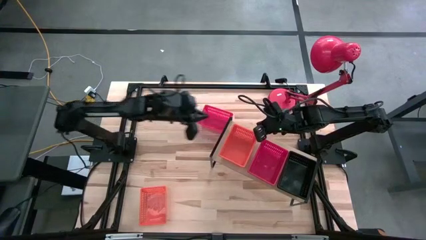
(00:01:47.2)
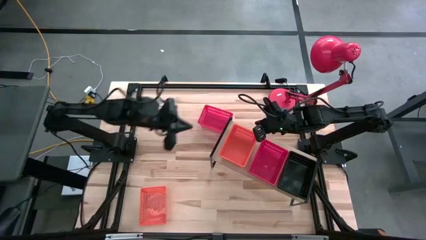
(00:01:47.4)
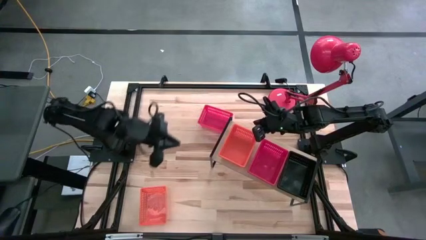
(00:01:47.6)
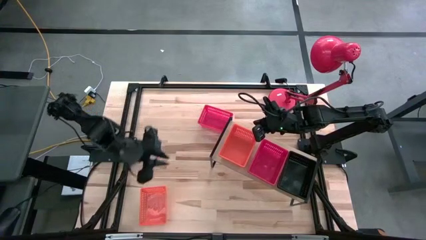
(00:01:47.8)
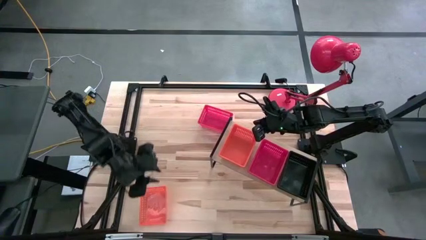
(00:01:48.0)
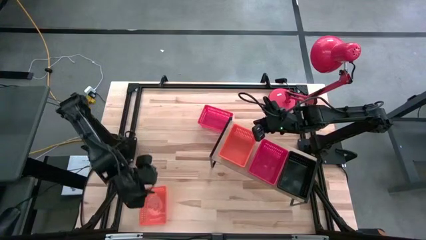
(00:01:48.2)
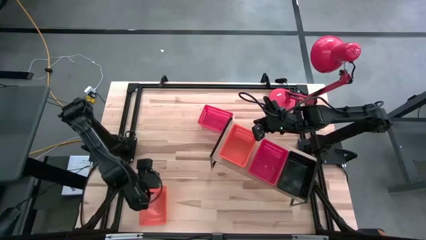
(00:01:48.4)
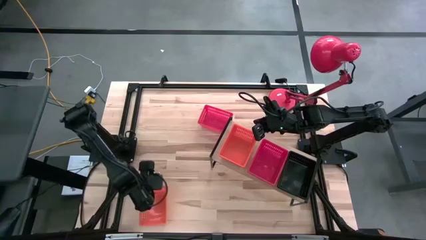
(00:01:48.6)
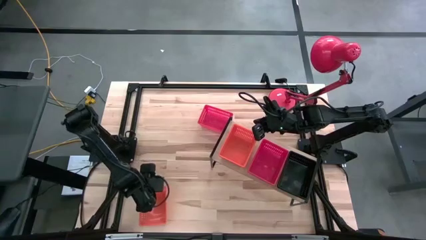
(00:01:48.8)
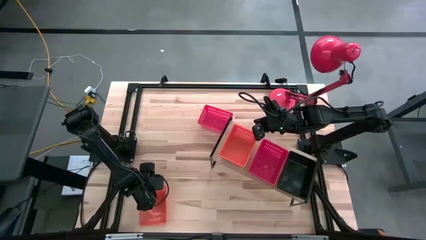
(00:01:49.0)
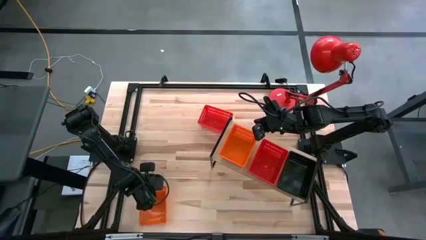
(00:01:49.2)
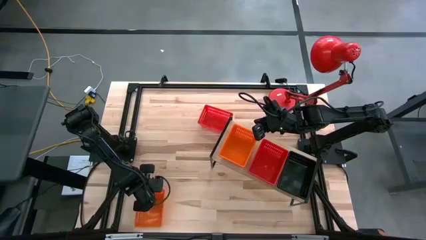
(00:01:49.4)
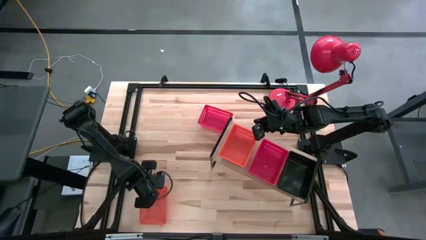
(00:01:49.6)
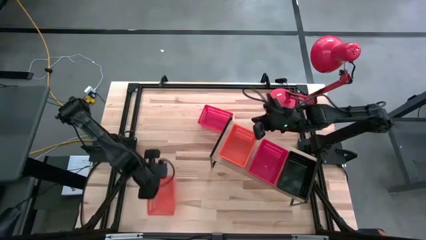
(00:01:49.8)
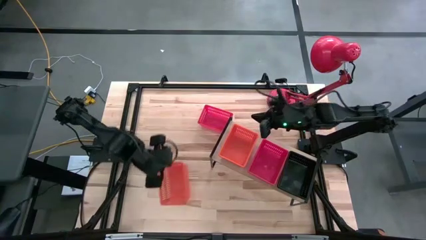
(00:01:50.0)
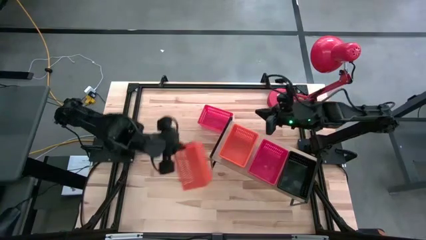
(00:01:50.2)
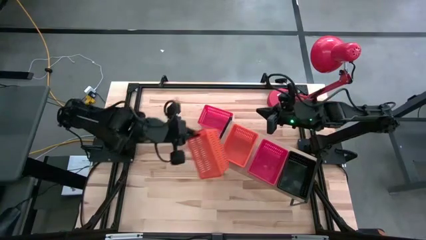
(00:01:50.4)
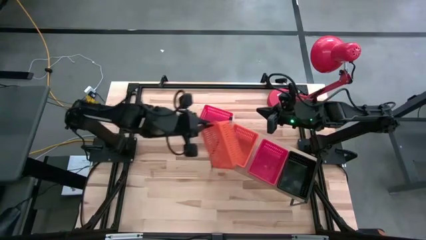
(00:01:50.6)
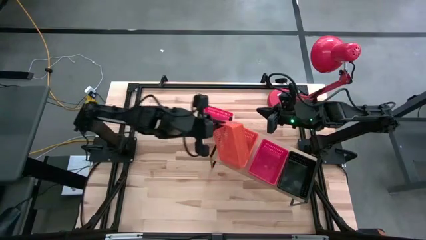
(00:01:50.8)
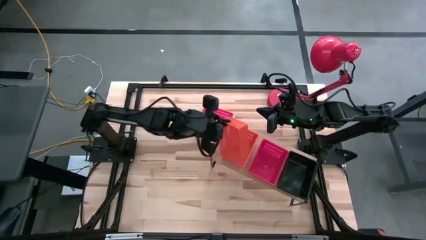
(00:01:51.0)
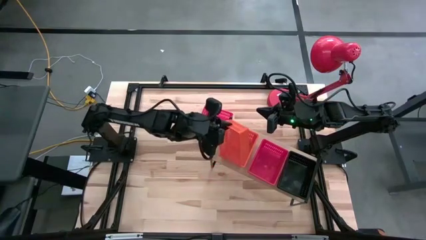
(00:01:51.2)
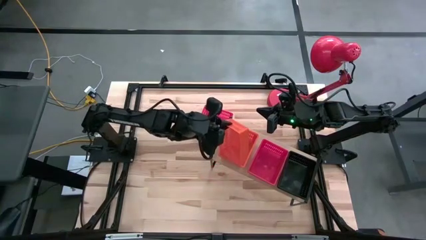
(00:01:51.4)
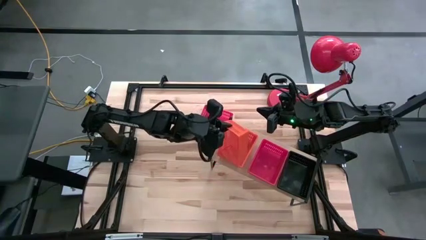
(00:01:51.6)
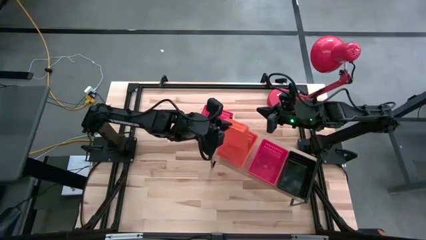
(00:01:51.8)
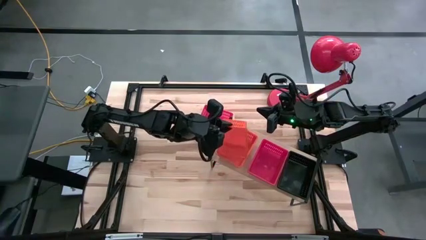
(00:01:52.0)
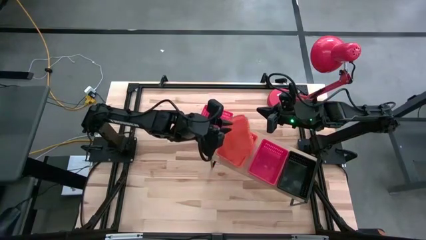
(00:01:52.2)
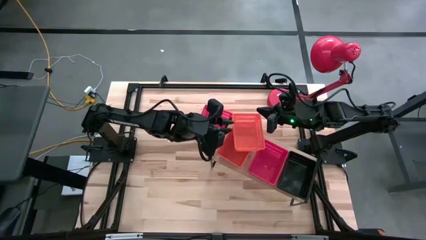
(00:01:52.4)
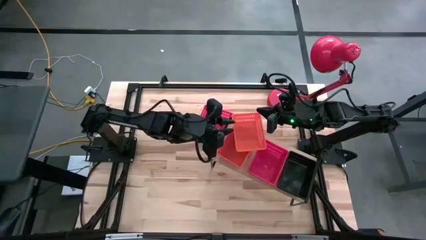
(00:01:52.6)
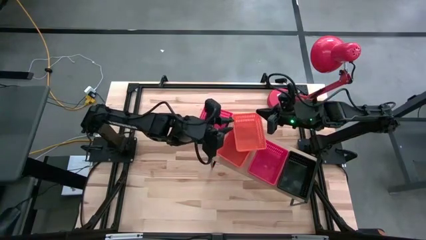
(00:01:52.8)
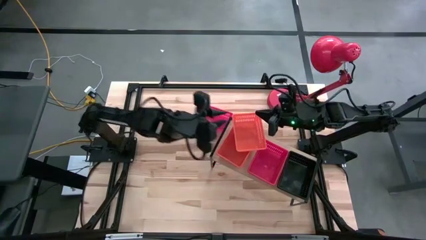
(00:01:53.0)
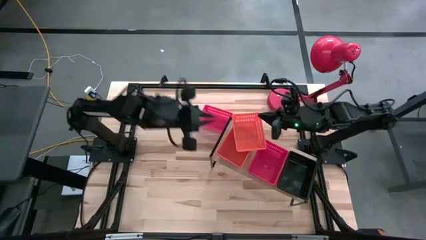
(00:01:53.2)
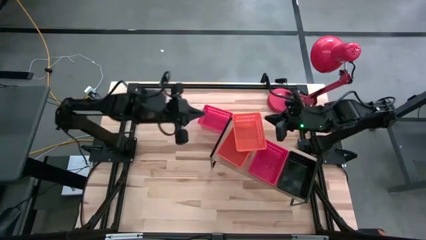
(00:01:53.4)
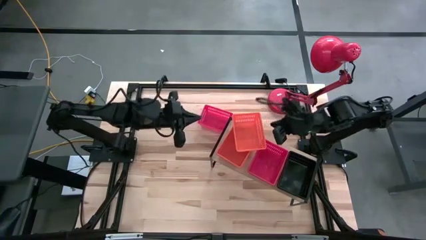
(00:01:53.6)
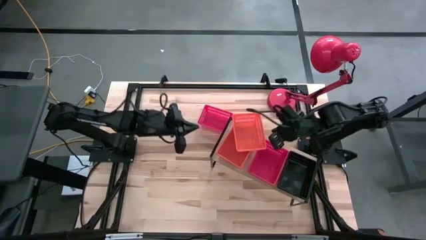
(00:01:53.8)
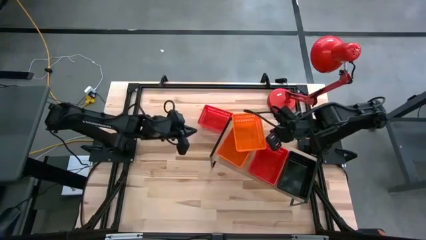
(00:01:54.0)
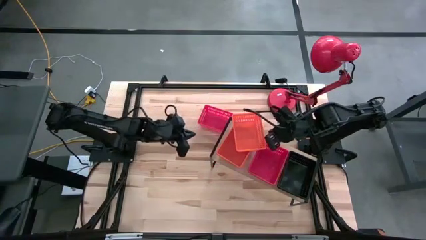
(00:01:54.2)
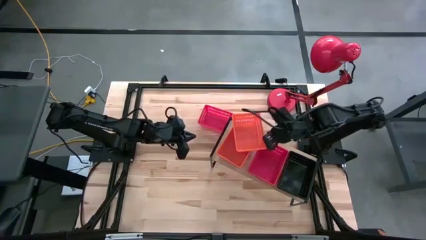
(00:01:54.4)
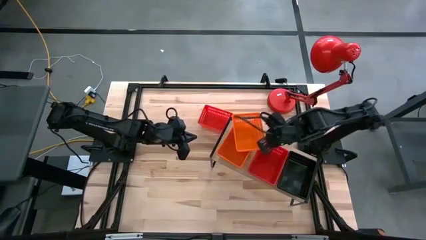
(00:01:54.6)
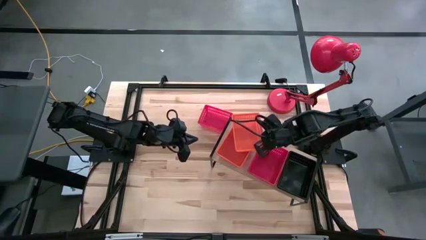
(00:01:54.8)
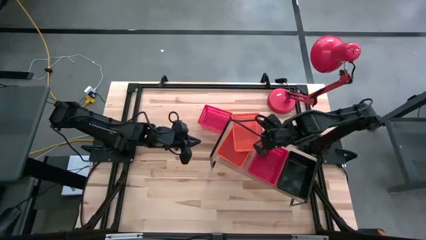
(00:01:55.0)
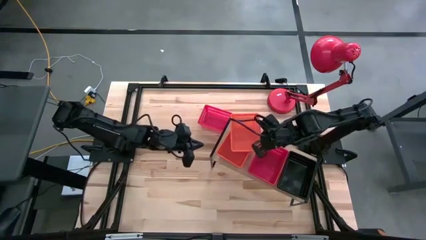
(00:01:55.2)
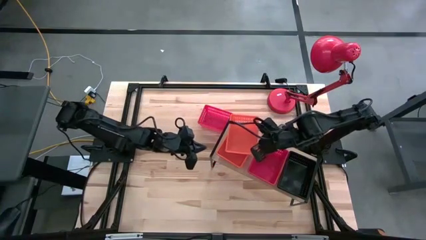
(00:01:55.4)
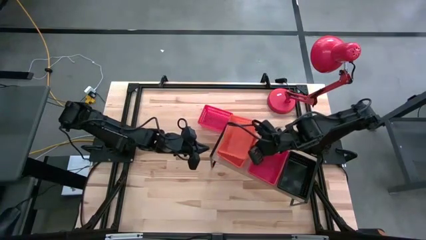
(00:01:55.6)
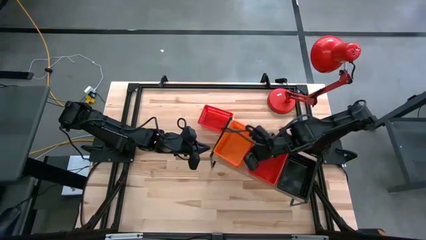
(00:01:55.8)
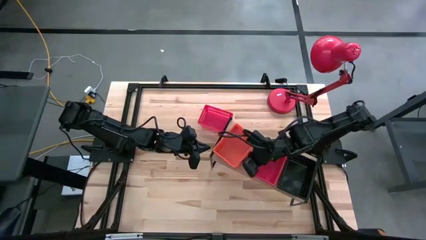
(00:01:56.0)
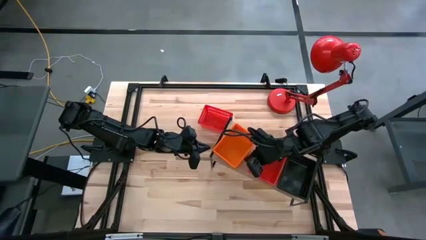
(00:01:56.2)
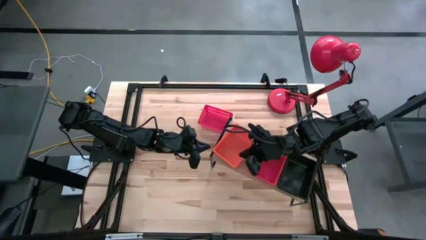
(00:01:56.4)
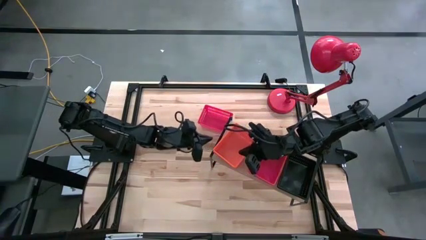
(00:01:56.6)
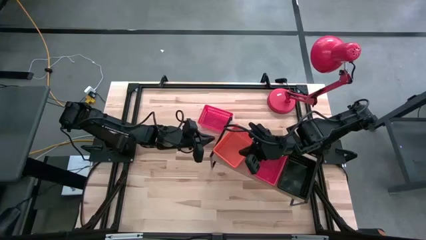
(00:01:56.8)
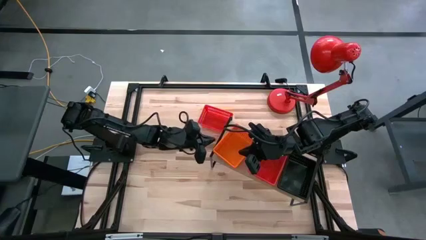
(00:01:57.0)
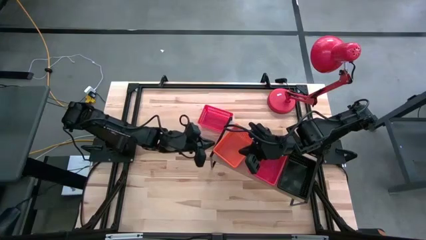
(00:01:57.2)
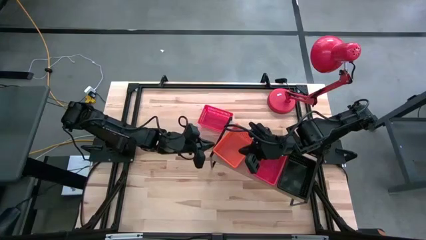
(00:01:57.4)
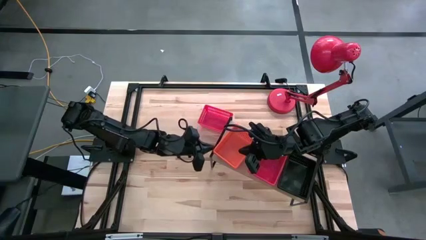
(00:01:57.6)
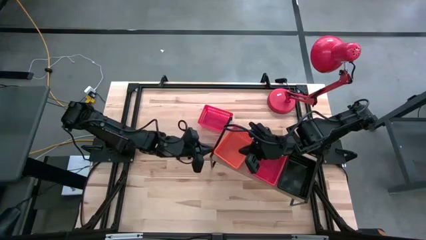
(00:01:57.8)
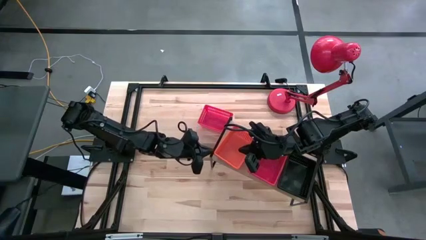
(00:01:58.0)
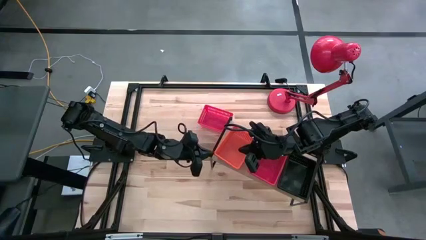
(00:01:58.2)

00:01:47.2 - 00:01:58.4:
Task: Stack baskets on shelf by color
Stack the orange bin on the orange bins on the shelf

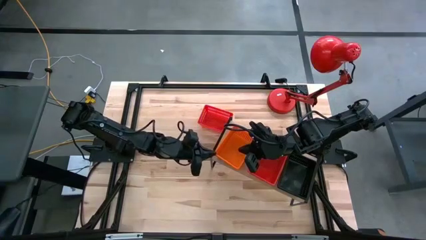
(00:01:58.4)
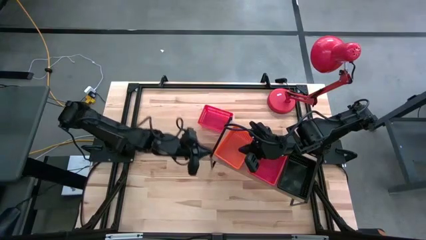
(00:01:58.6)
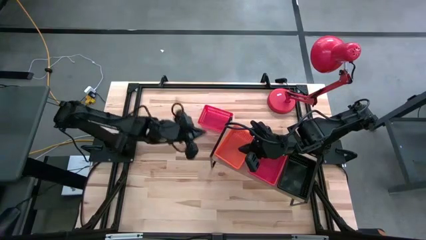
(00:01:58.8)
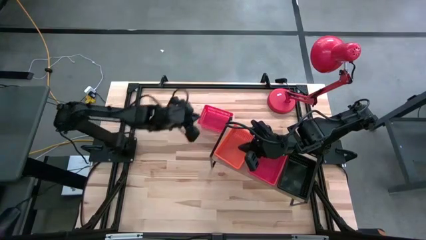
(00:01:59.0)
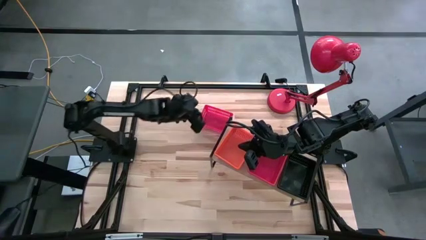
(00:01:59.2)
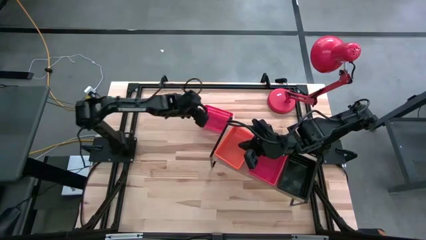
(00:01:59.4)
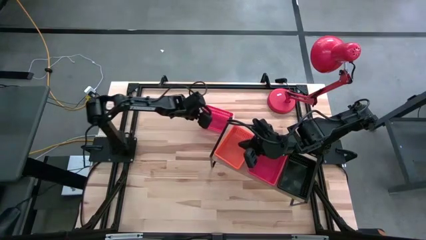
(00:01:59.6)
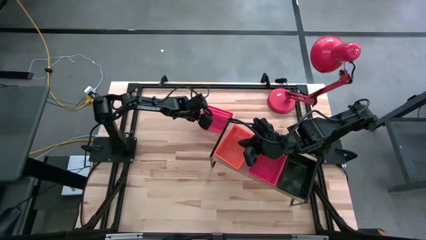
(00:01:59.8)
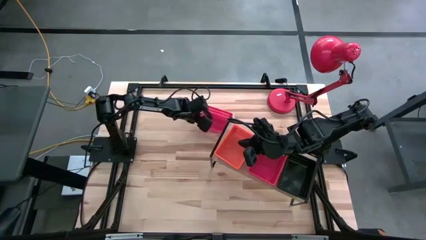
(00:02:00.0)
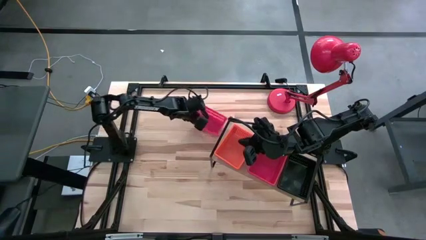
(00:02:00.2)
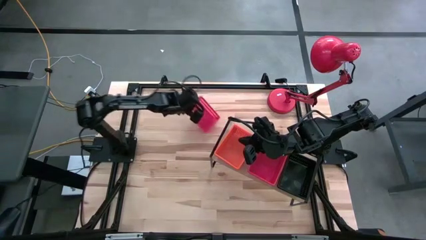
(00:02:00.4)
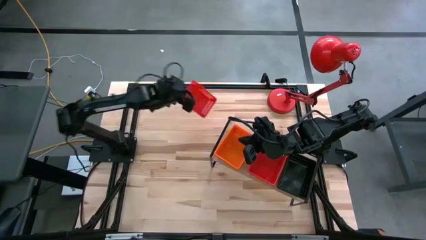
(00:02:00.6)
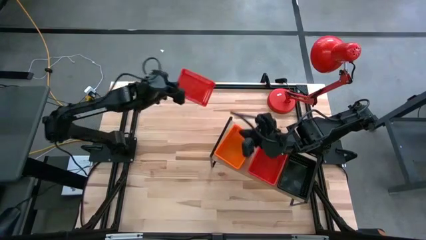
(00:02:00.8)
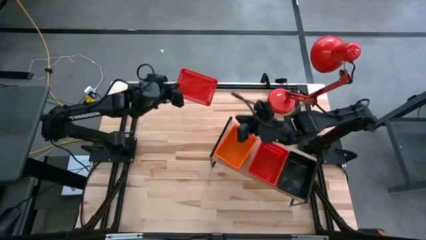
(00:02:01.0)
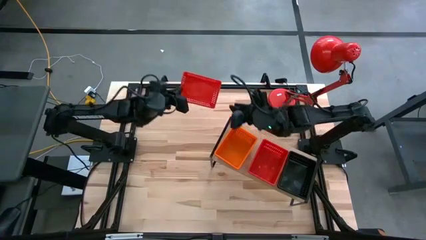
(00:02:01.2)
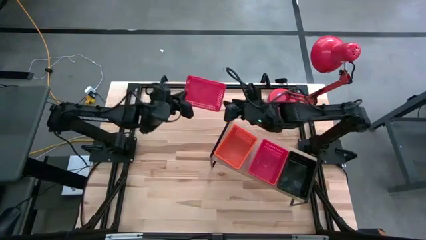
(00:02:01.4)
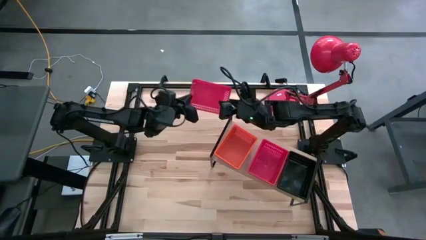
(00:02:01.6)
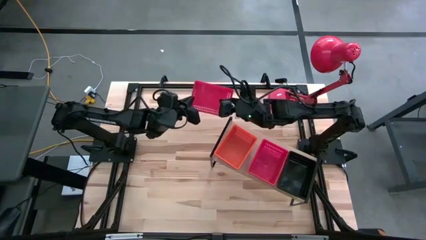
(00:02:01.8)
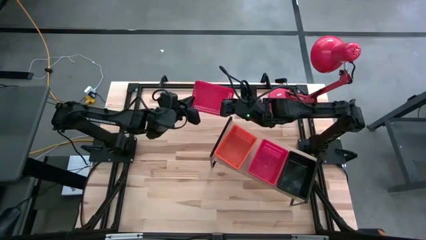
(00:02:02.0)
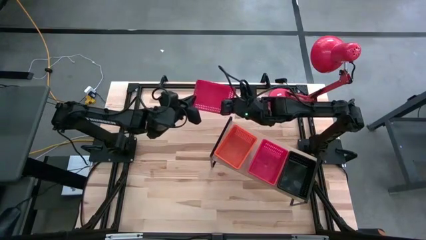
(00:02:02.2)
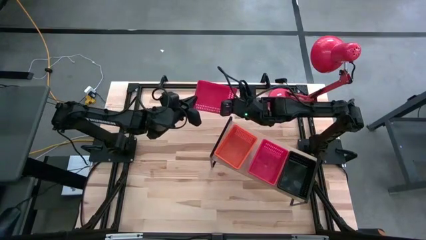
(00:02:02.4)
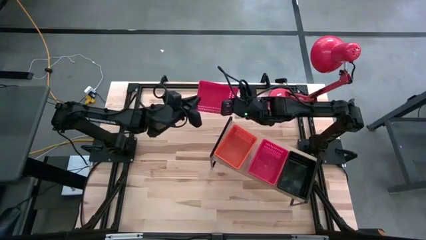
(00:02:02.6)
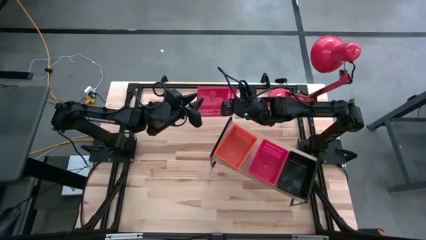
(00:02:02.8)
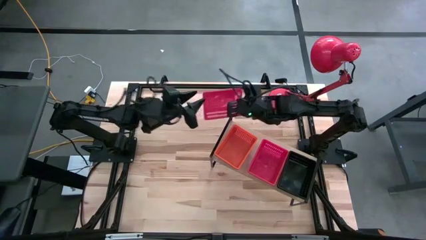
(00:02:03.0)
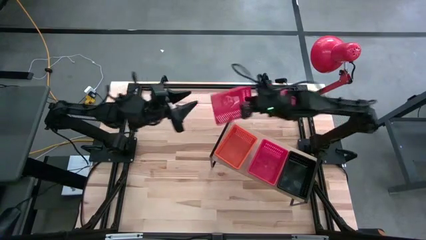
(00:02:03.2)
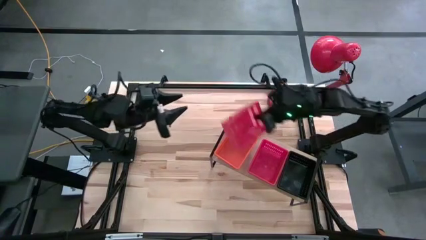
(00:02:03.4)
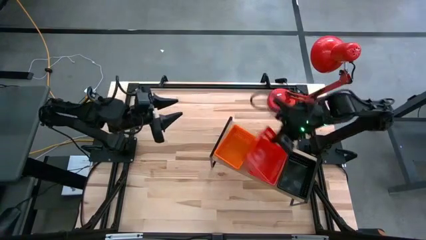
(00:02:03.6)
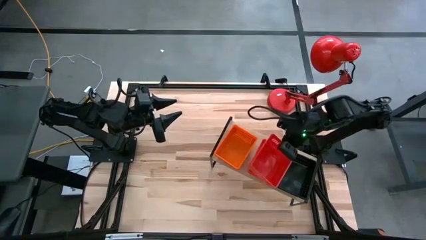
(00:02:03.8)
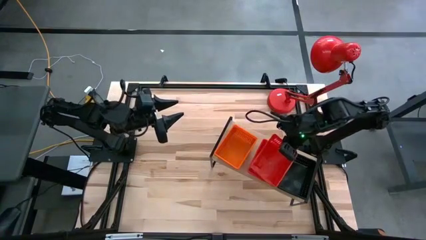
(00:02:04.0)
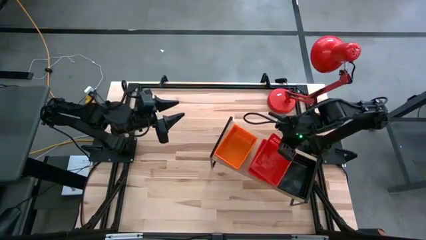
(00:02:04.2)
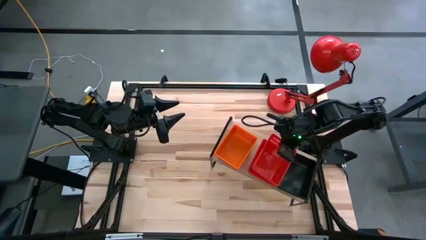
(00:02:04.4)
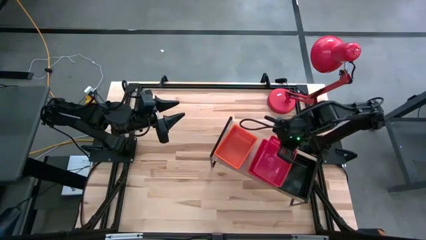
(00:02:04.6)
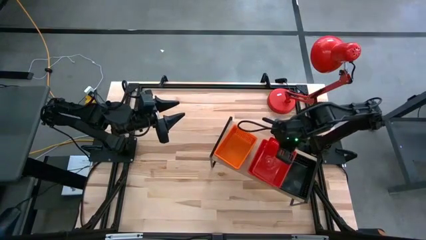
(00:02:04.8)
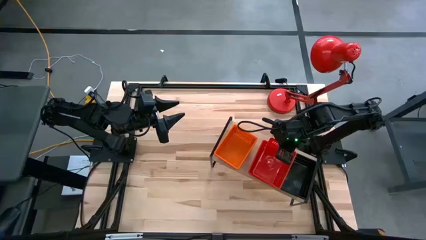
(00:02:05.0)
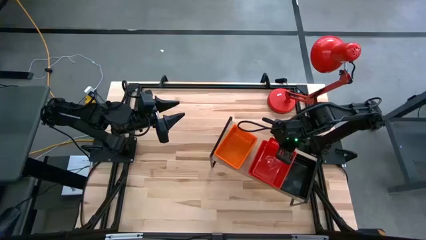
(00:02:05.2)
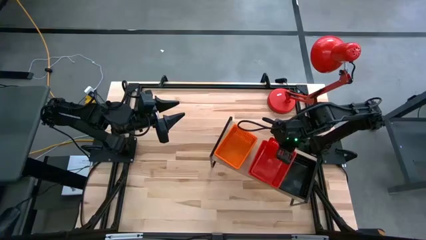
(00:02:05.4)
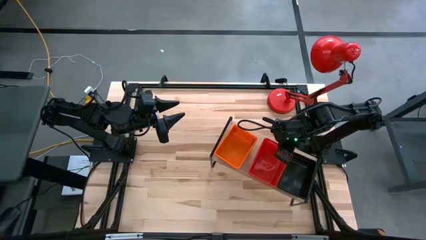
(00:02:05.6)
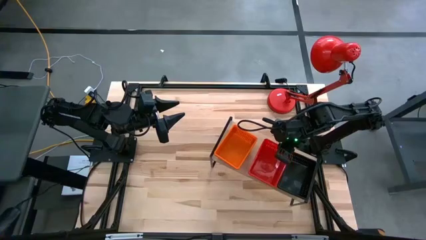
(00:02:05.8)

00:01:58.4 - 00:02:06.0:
Stack the red bin on the red bins on the shelf
